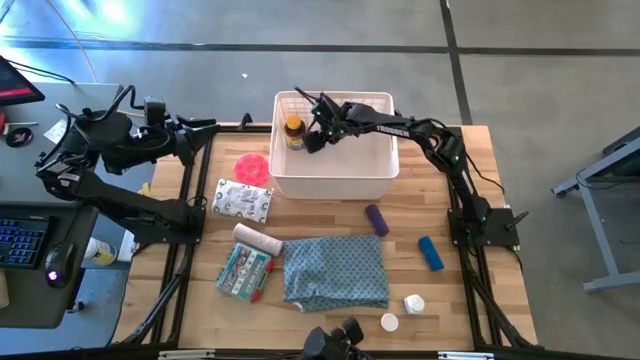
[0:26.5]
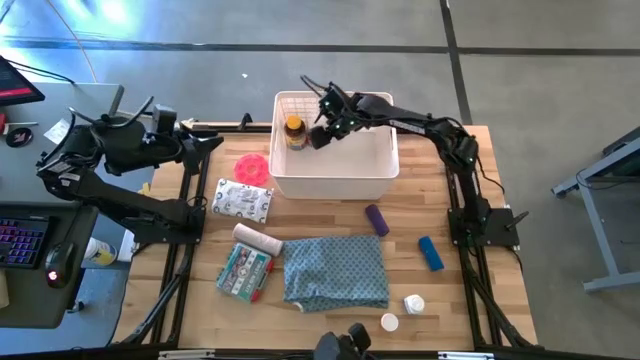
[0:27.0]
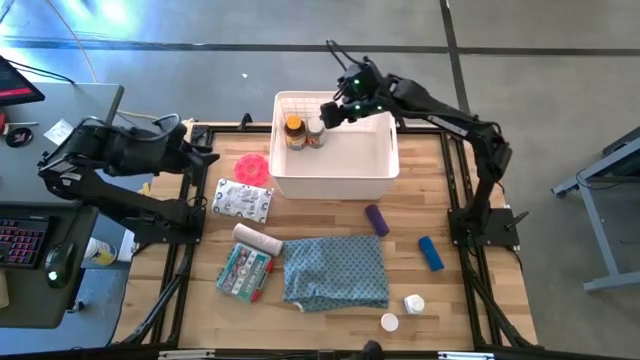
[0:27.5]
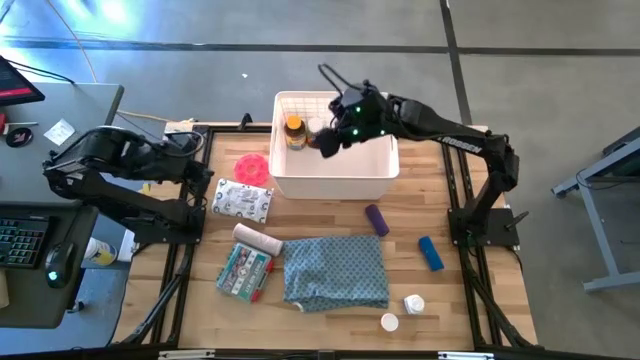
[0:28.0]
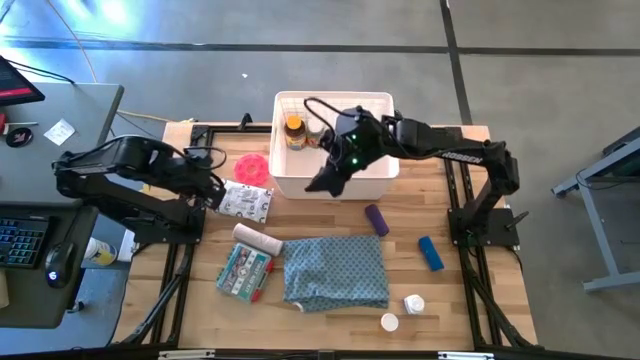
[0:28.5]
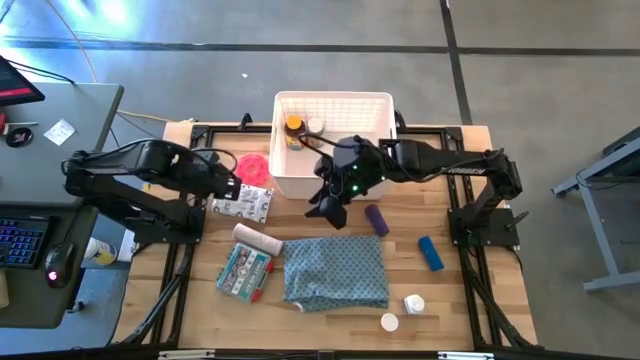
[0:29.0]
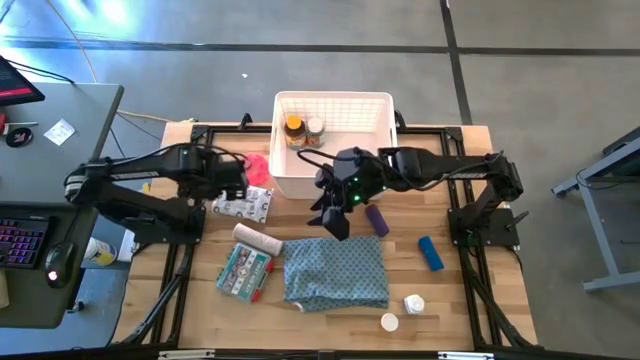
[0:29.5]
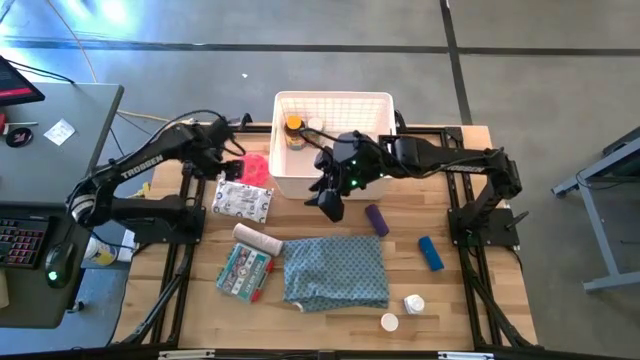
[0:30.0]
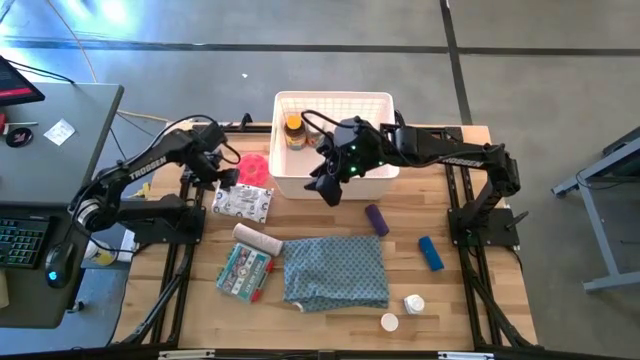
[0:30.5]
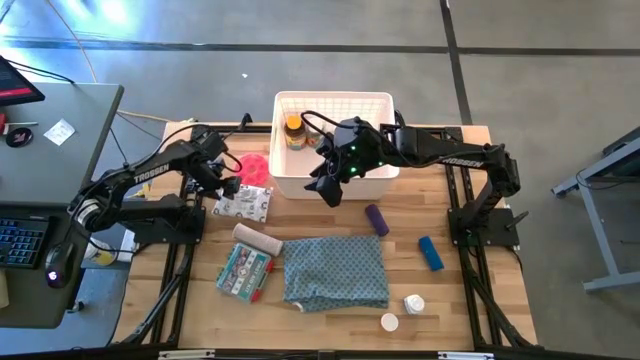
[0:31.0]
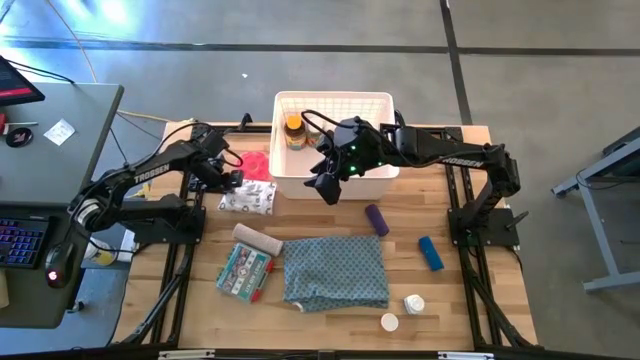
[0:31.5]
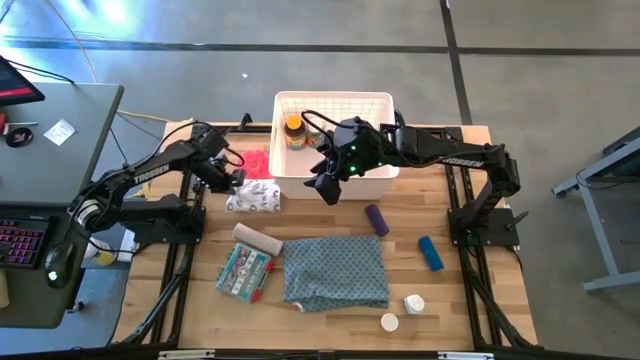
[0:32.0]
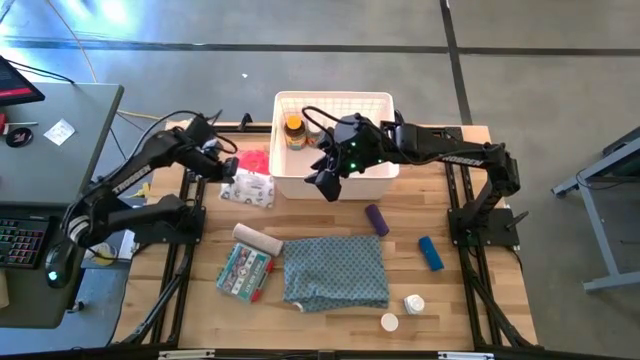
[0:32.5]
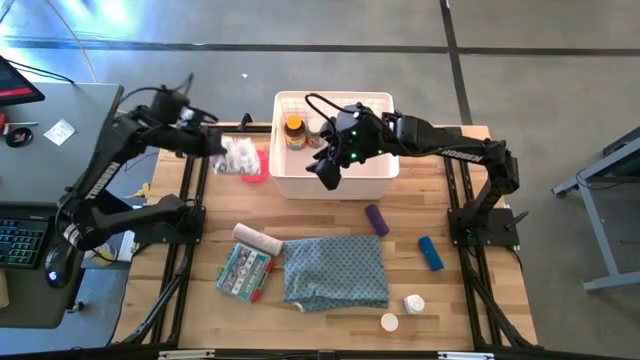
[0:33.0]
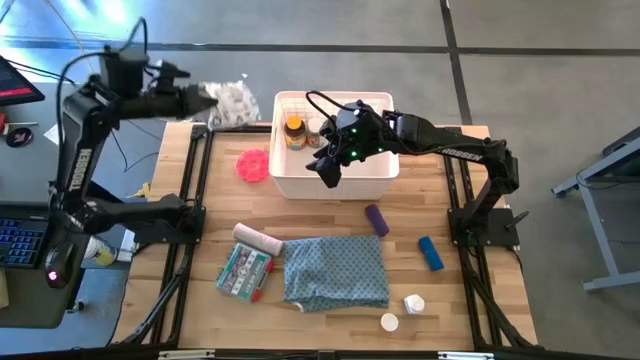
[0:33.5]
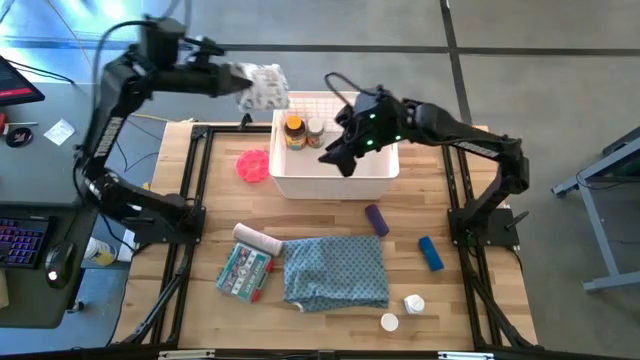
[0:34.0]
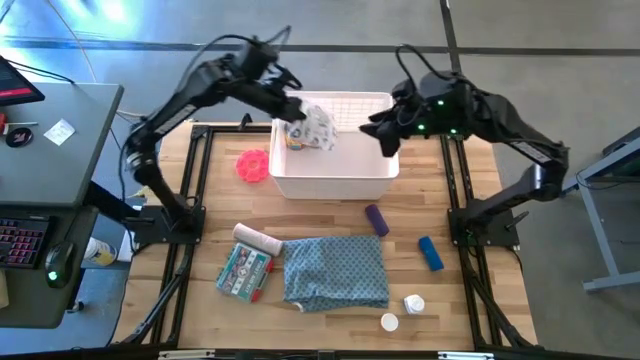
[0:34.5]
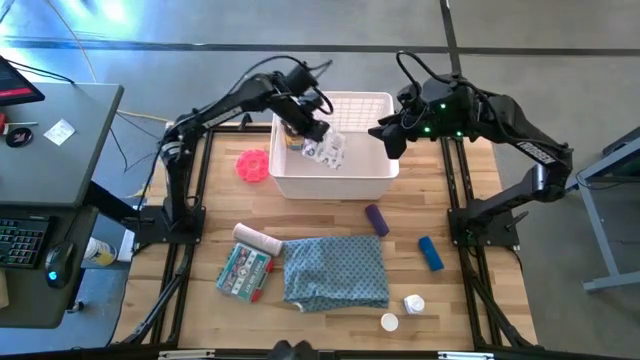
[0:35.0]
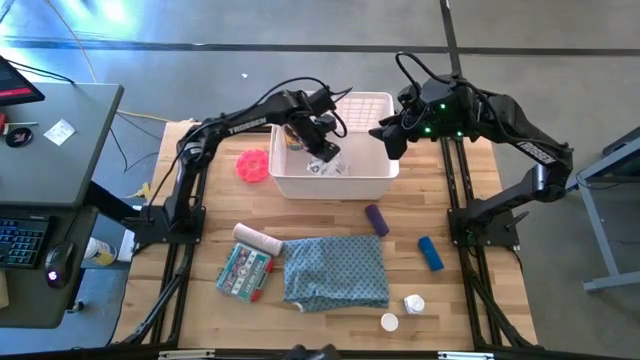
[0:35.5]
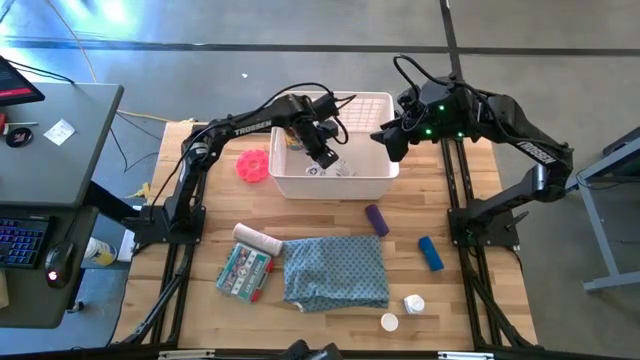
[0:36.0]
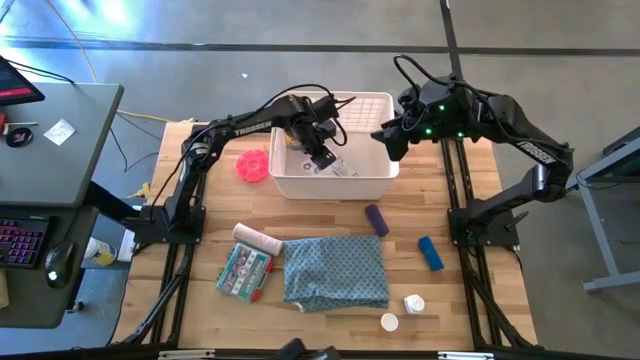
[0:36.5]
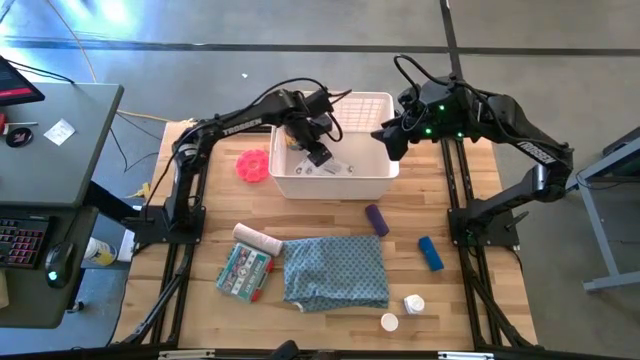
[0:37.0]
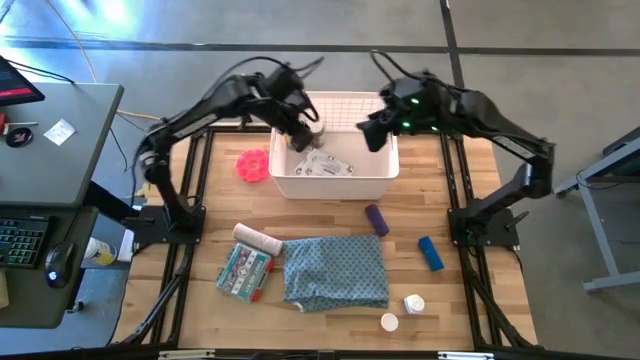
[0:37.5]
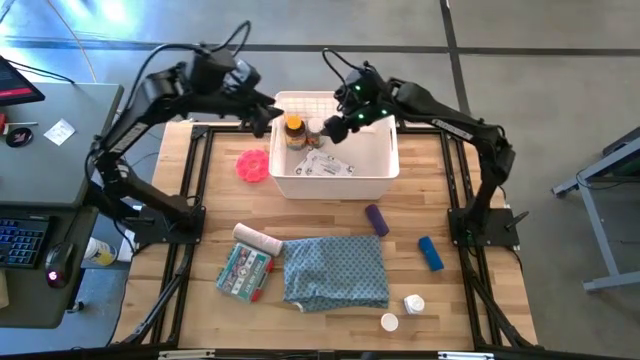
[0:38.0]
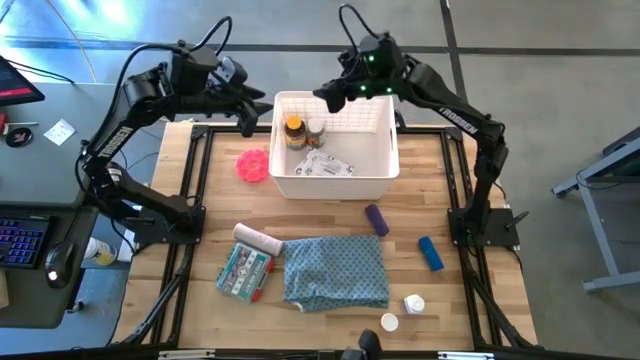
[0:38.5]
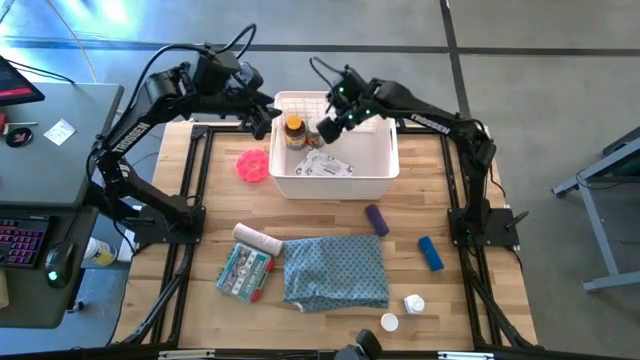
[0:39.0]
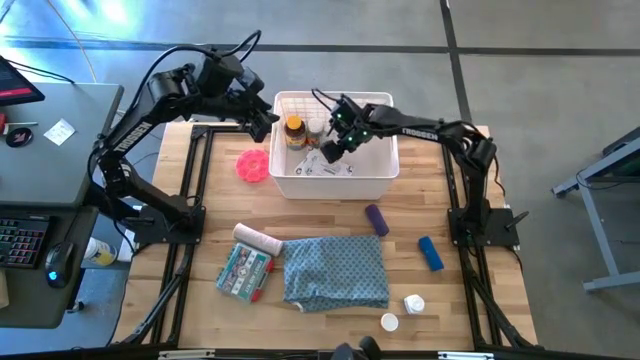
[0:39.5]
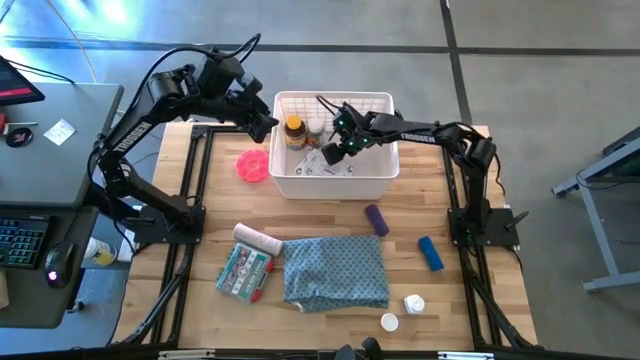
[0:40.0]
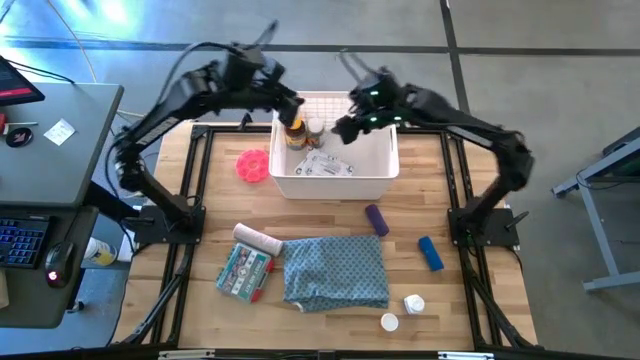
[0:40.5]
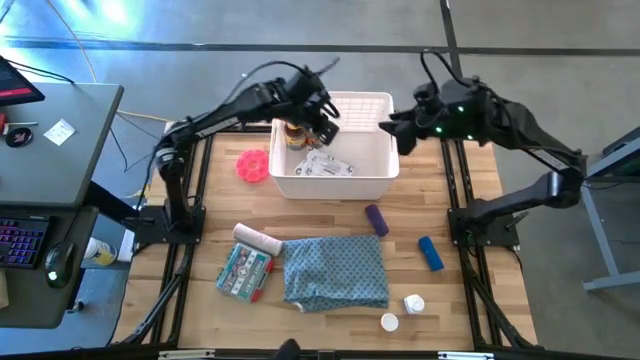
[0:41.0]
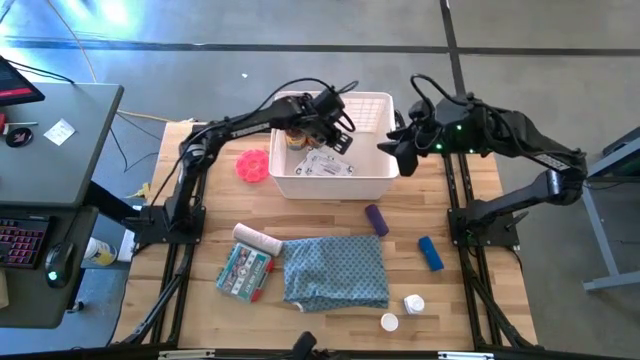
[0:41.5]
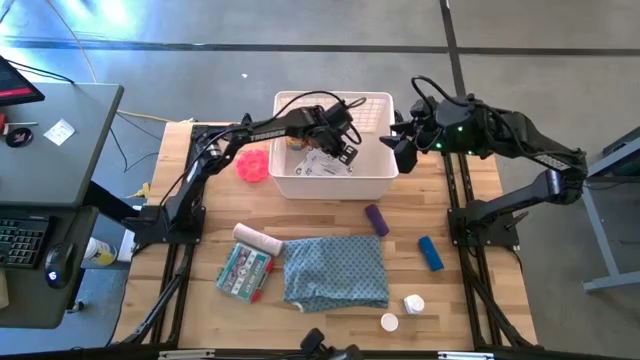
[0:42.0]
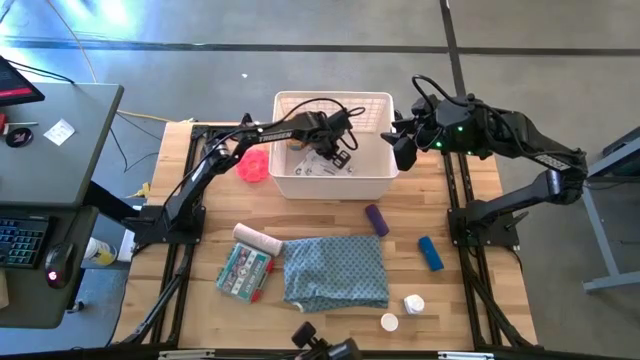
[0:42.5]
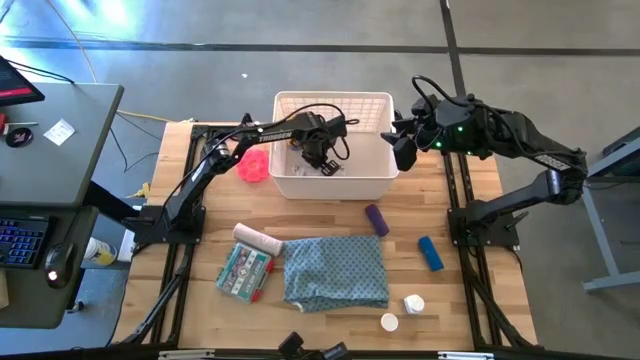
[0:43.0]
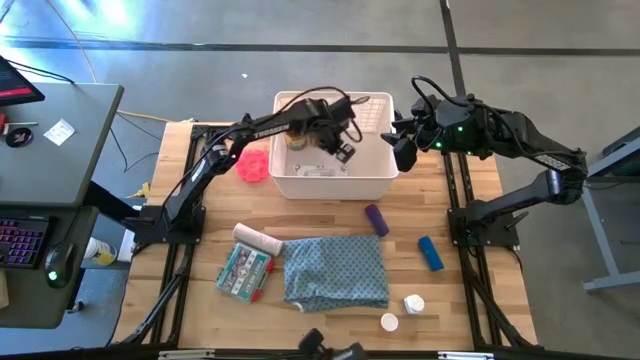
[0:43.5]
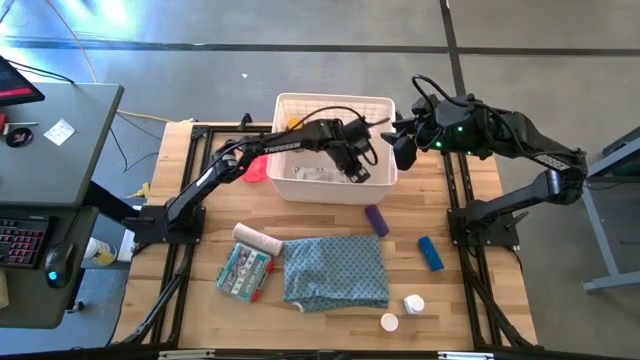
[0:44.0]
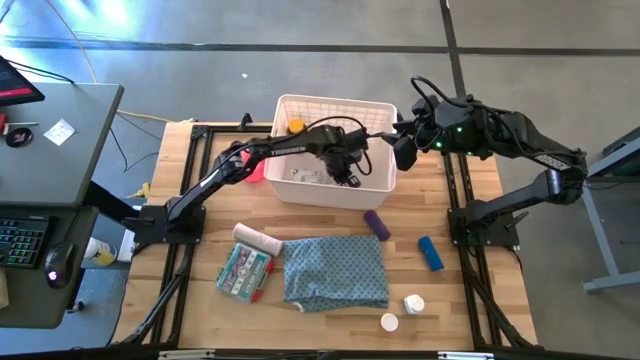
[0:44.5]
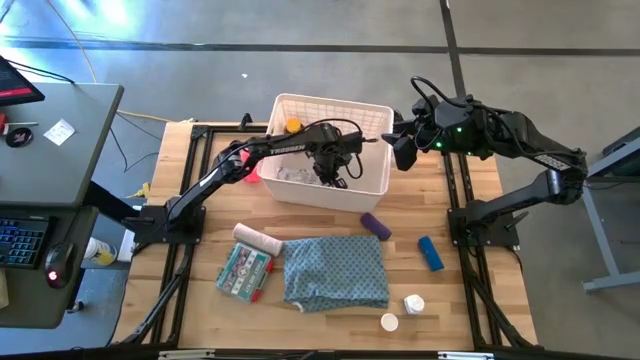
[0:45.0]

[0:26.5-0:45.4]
Task: Pick & place medical supplies in basket/bin
Put the mailer bag into the white bin

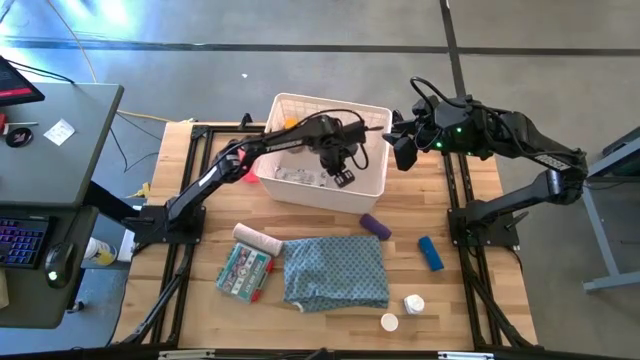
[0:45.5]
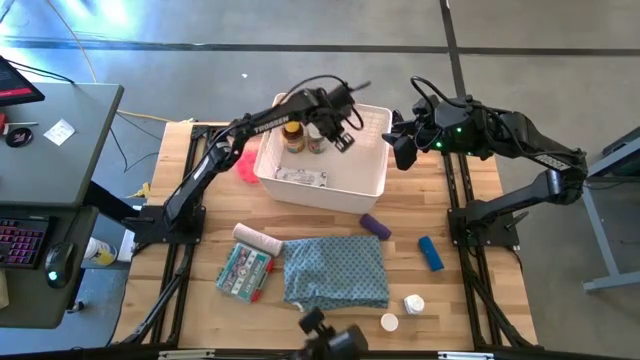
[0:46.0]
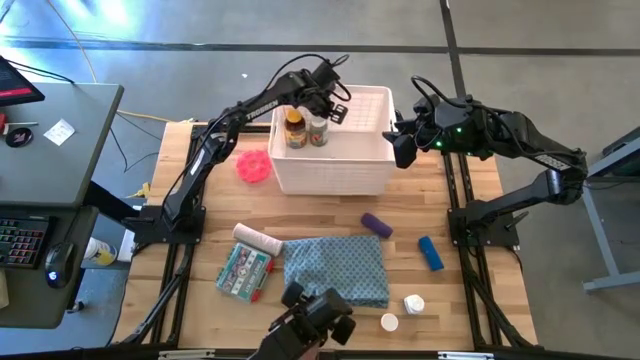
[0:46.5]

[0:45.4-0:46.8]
Adjust the white bin

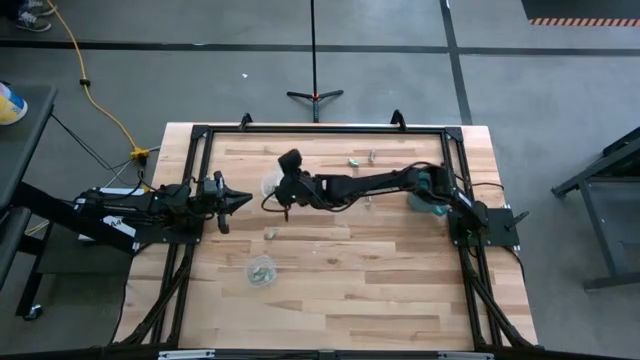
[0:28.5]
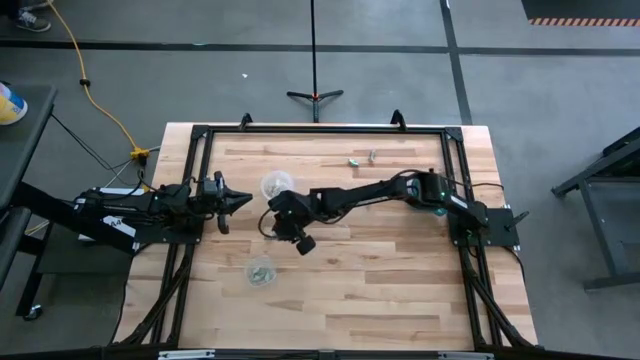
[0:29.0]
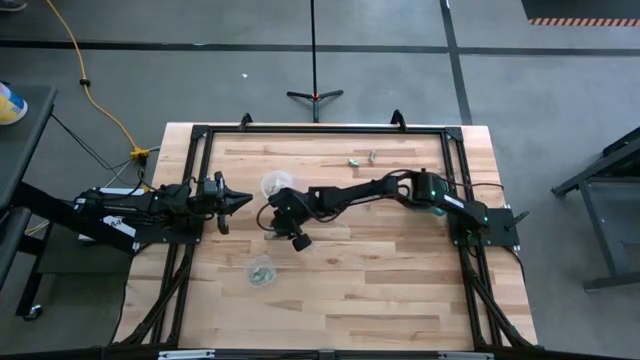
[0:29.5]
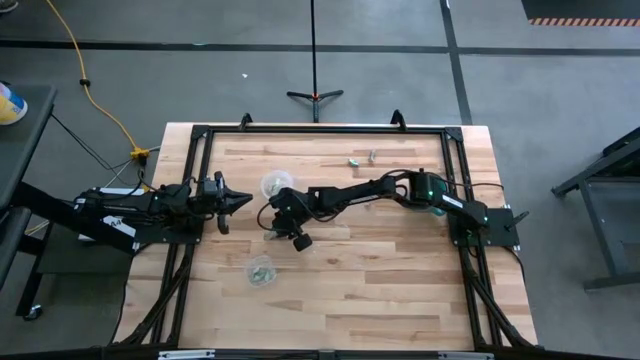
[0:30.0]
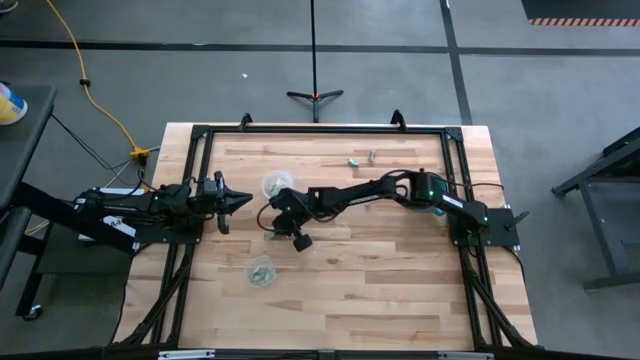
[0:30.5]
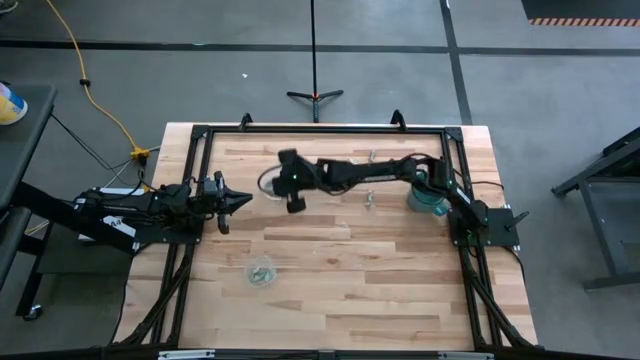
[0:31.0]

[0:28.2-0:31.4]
Task: Pick and place items into bin
Put the white stevia packet into the top transparent bin
